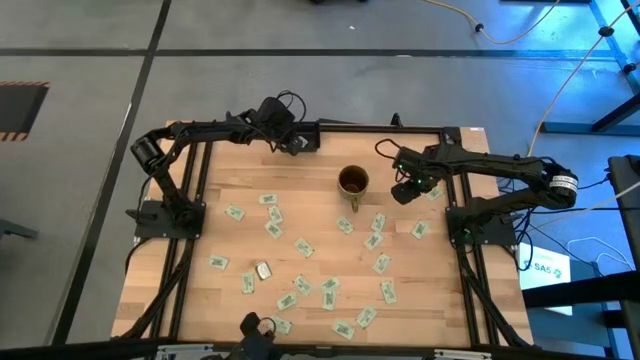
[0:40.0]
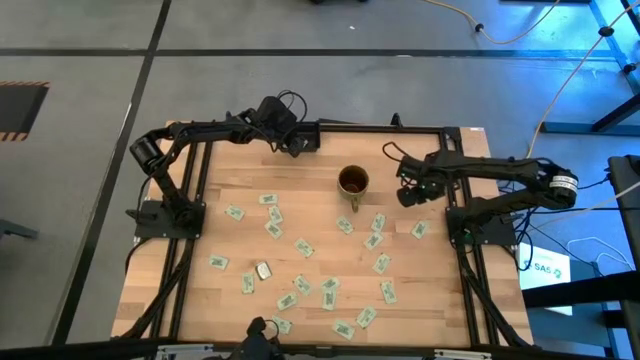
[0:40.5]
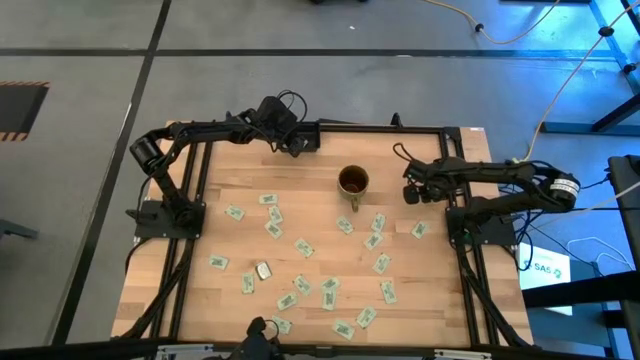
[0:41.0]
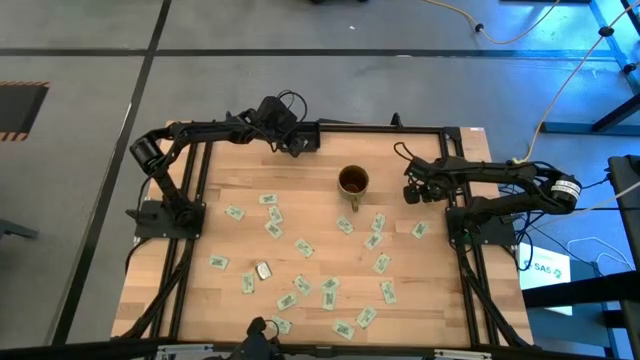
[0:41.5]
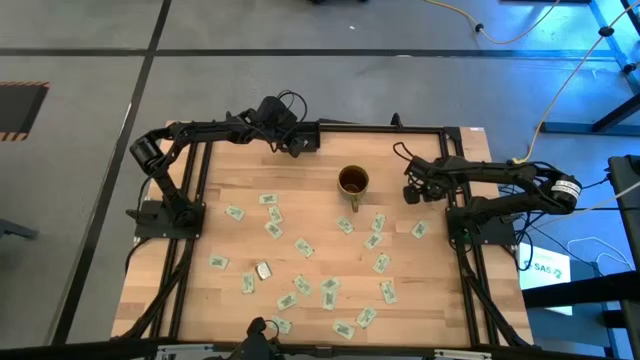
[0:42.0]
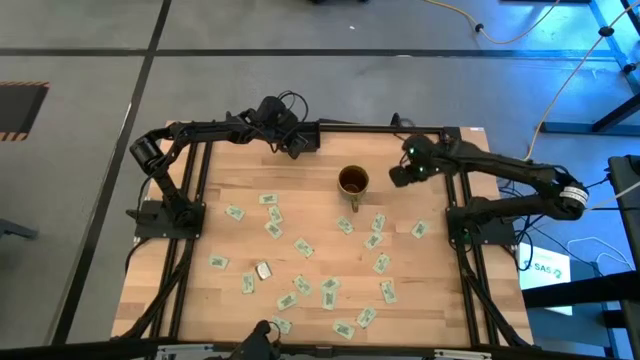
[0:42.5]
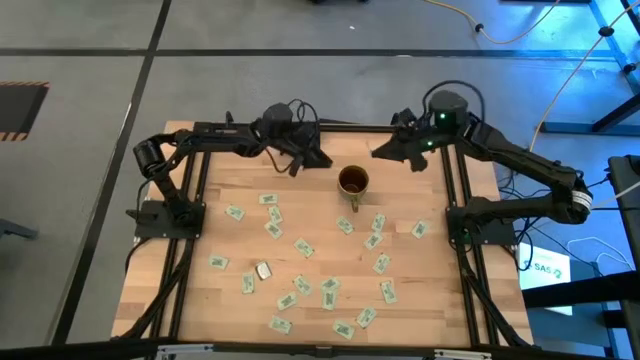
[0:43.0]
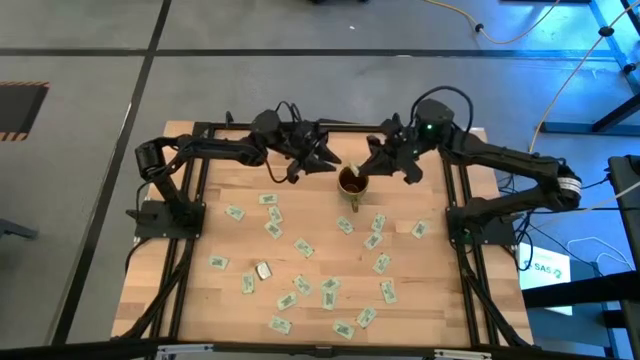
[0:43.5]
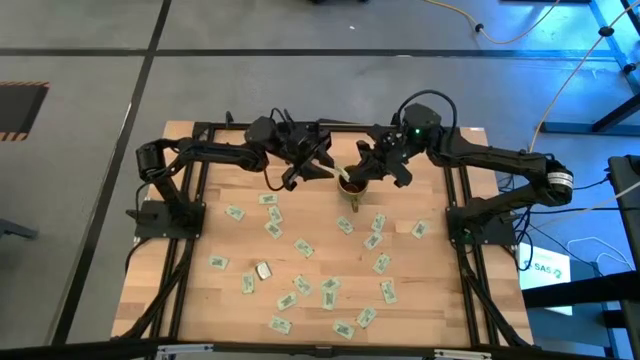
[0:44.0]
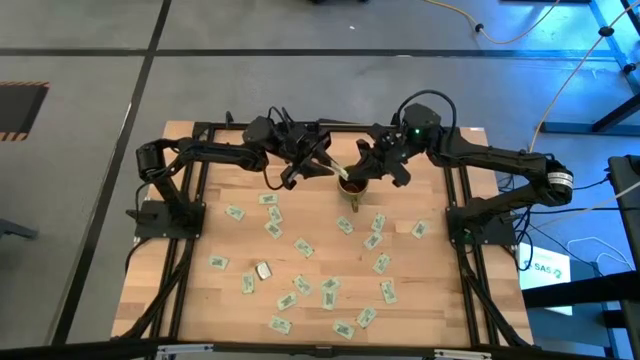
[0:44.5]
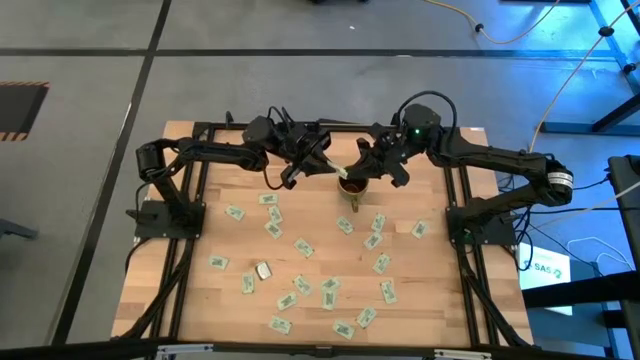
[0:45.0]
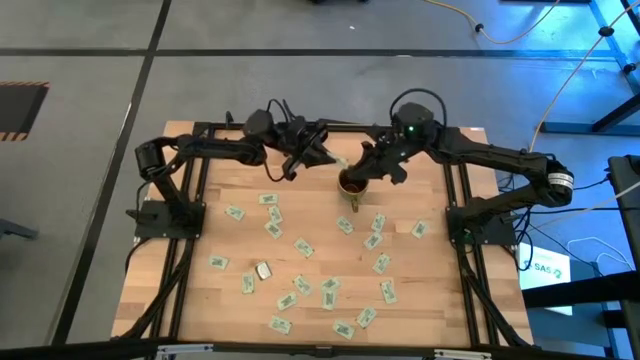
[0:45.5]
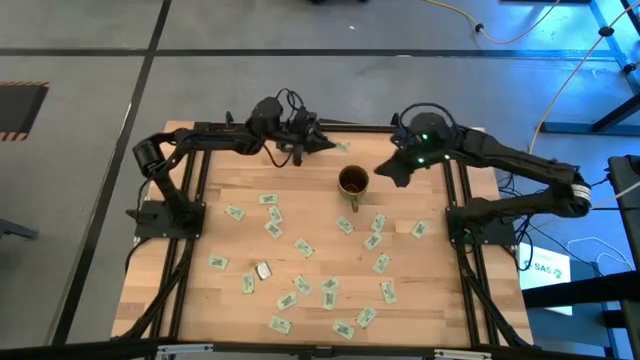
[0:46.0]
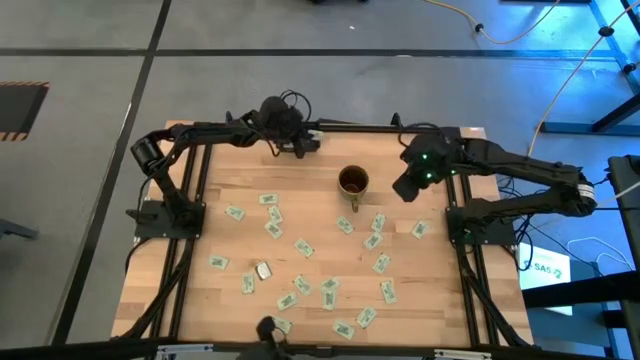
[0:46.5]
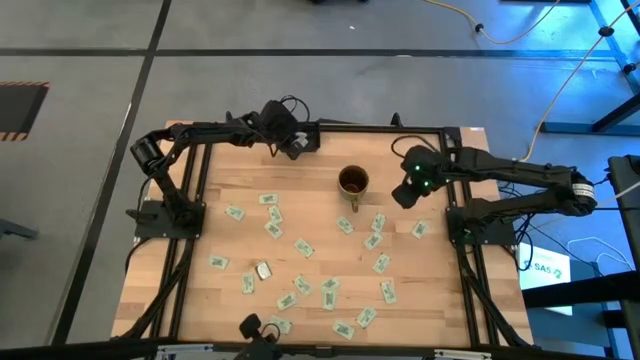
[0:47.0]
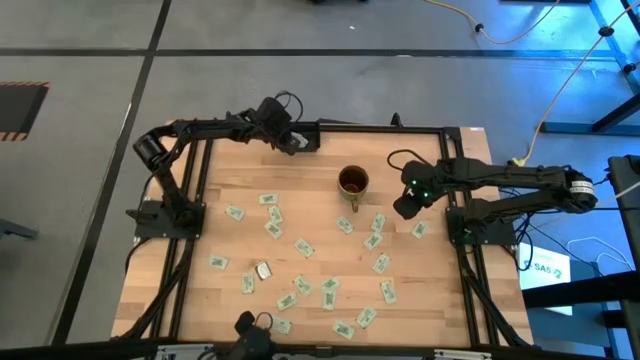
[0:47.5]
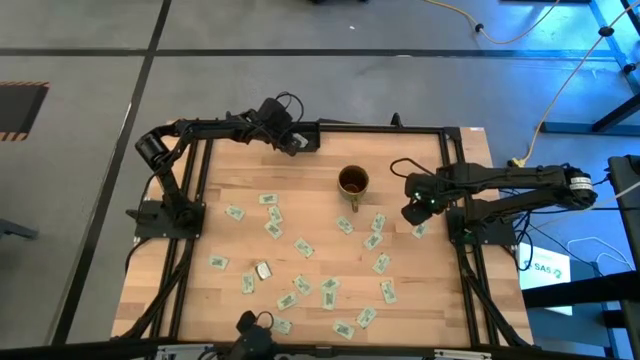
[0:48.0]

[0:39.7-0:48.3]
Task: Pick and place Stevia / Truvia into bins
Put the stevia packet into the black container

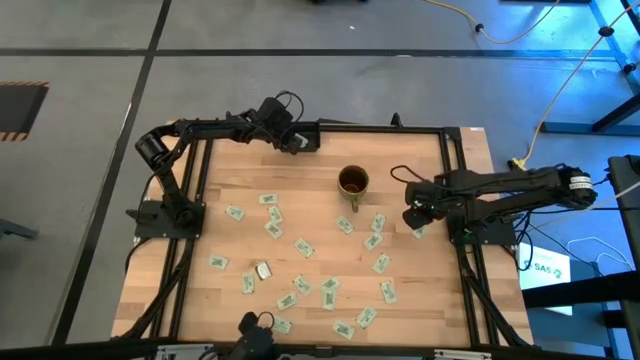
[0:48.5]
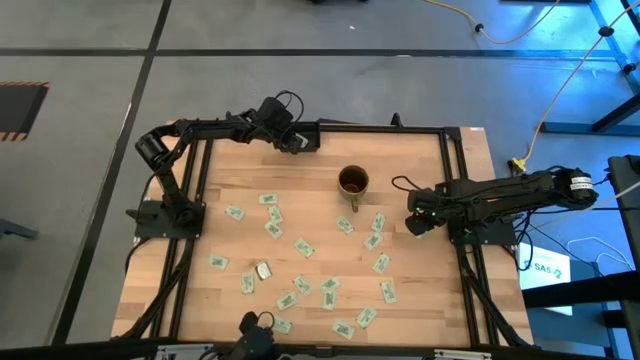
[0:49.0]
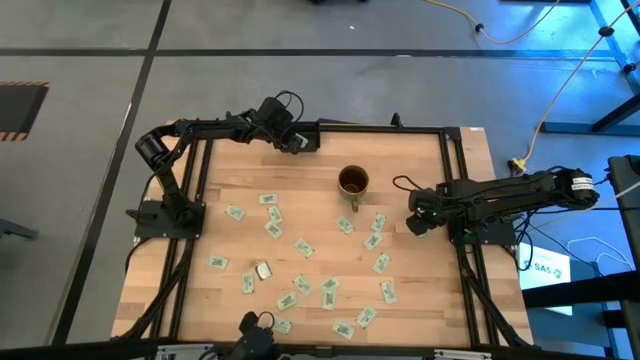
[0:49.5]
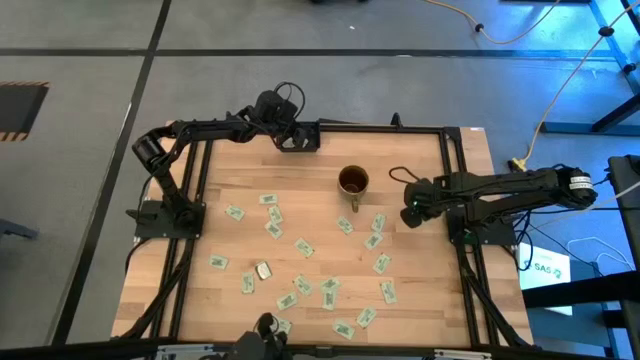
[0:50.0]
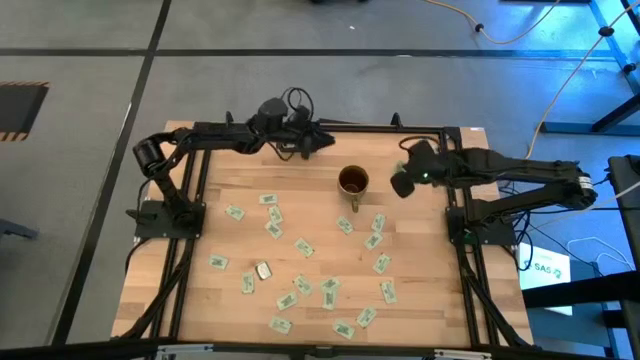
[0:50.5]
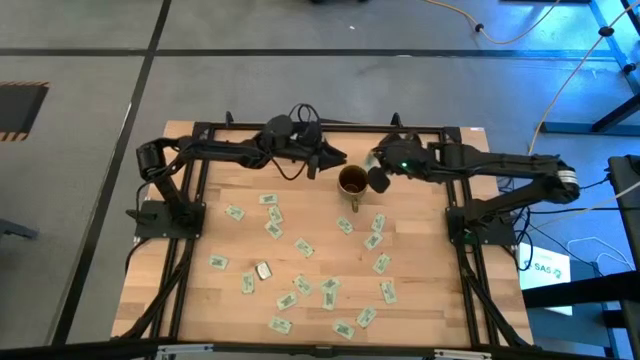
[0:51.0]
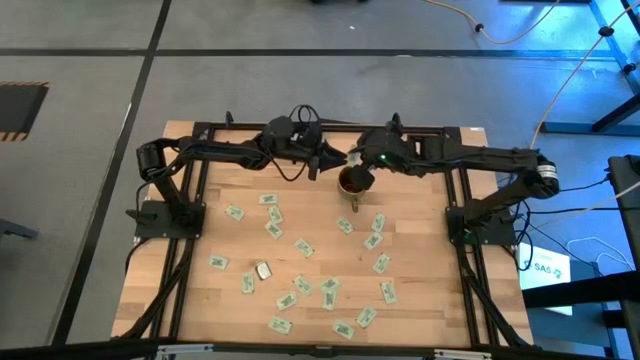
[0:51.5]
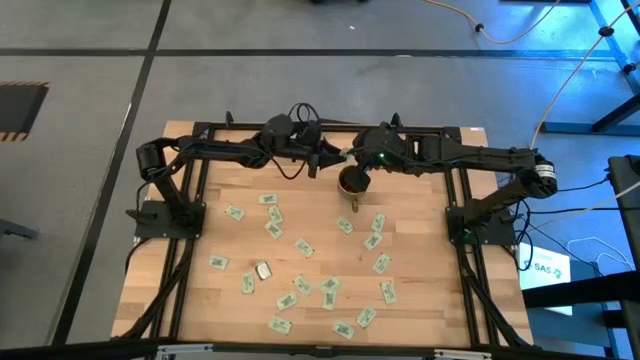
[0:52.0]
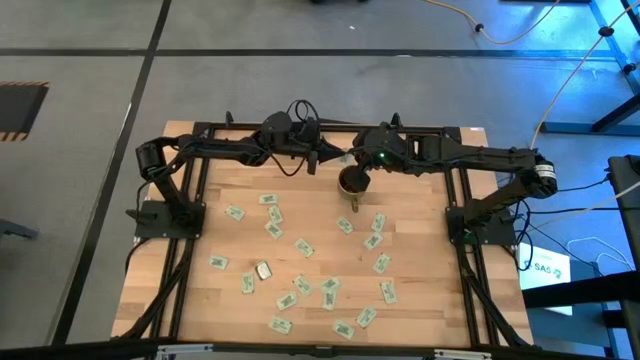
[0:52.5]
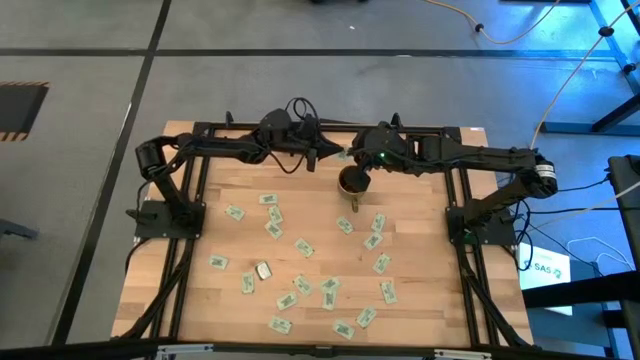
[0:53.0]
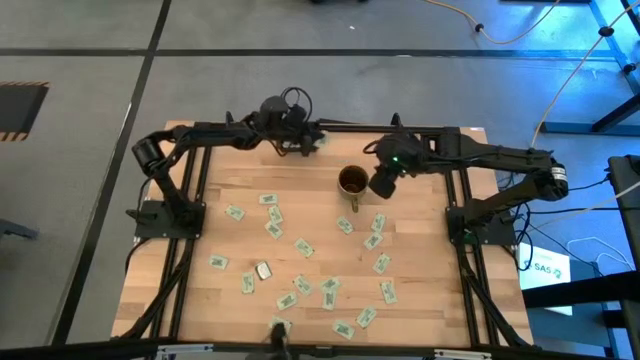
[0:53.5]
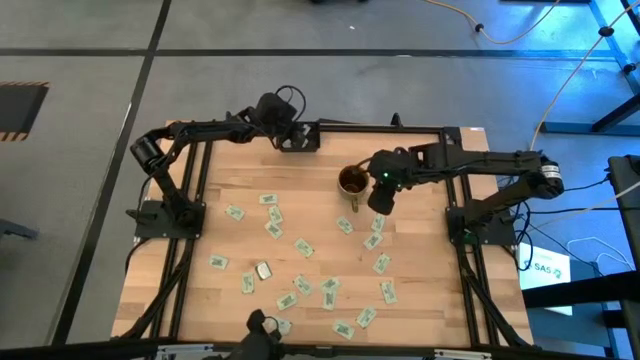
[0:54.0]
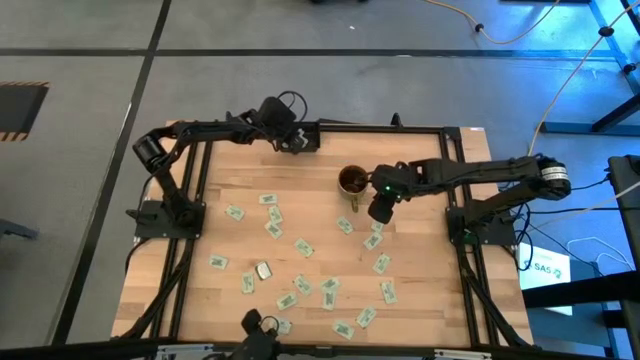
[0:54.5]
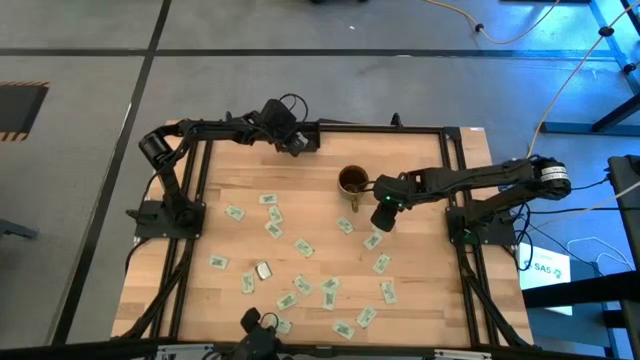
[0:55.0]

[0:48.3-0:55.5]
Put the stevia packet into the black container

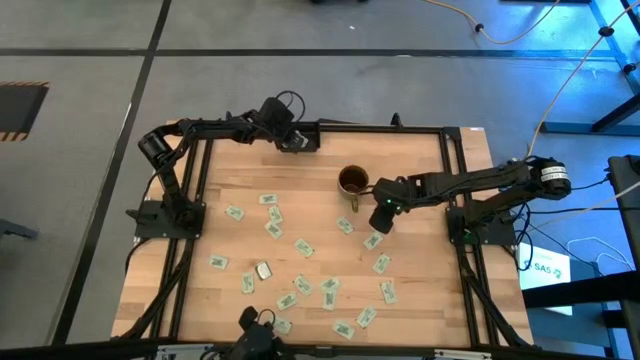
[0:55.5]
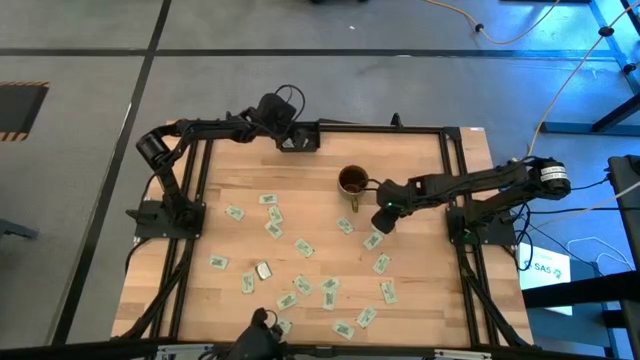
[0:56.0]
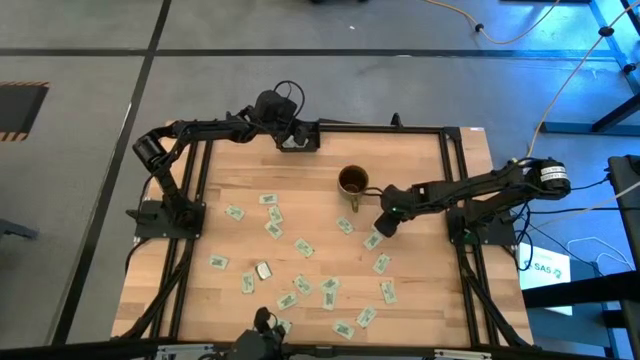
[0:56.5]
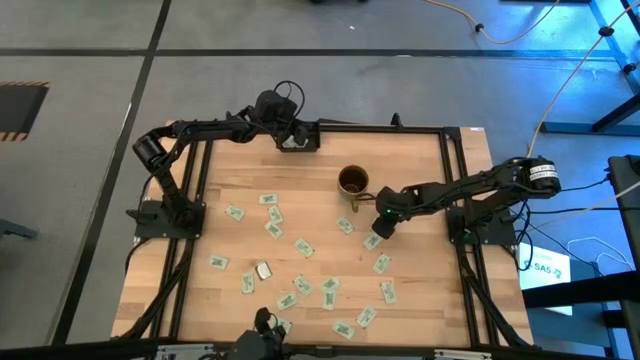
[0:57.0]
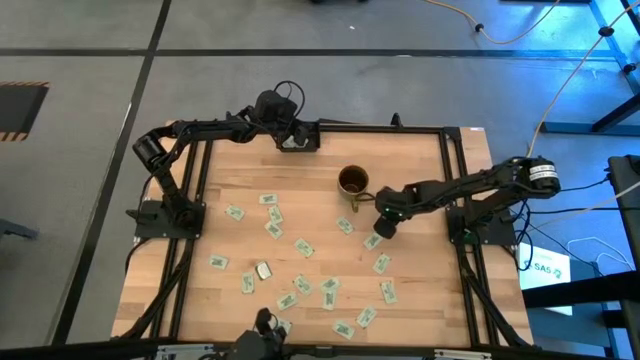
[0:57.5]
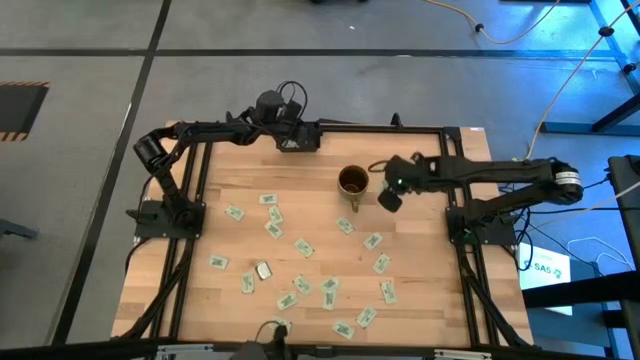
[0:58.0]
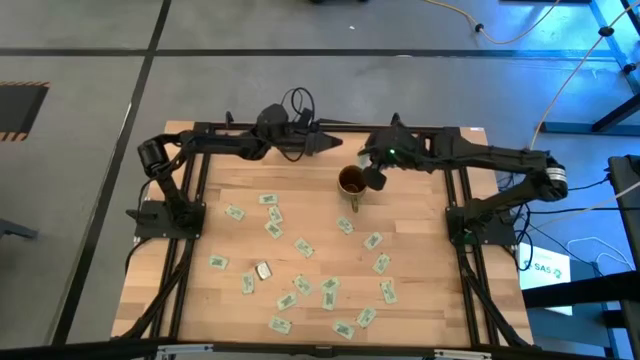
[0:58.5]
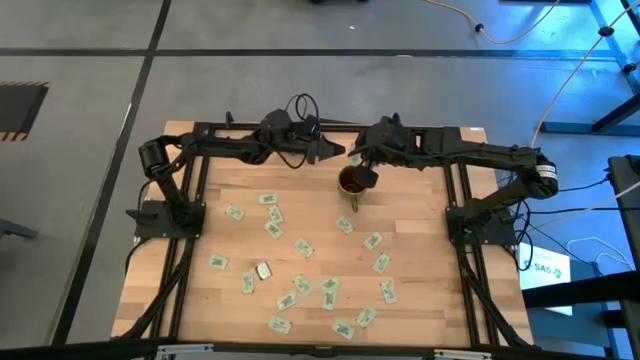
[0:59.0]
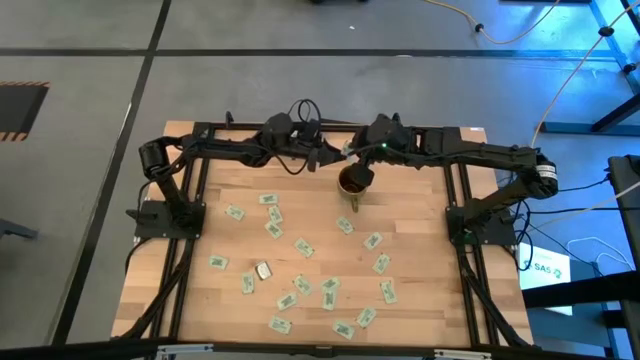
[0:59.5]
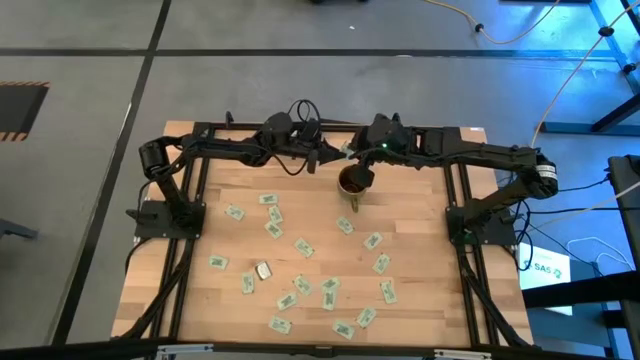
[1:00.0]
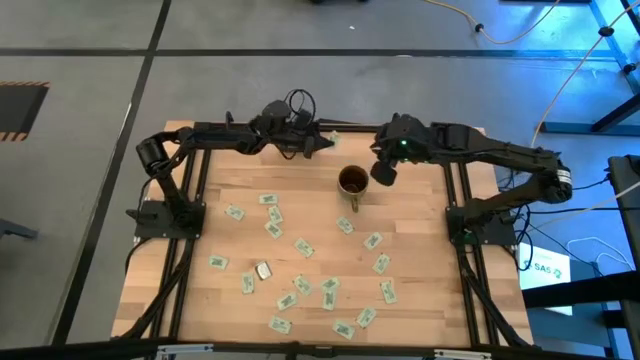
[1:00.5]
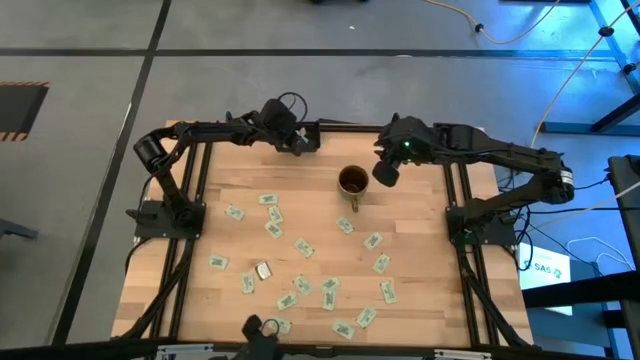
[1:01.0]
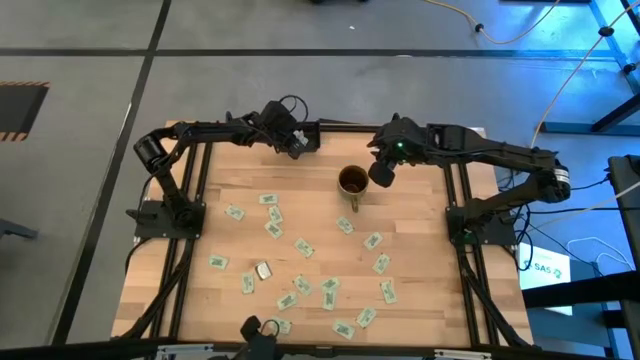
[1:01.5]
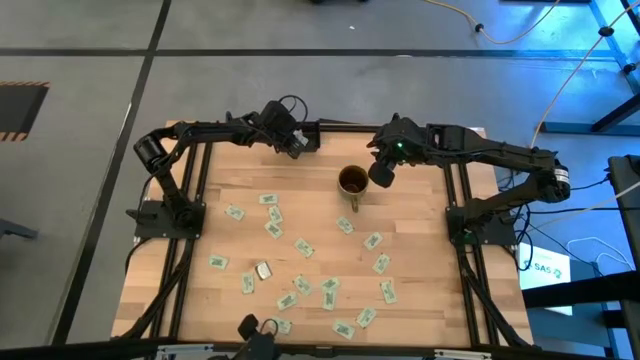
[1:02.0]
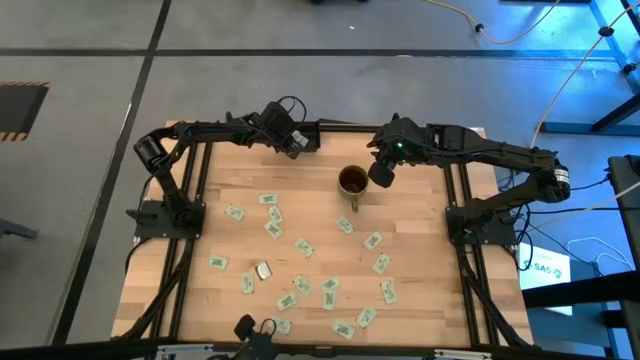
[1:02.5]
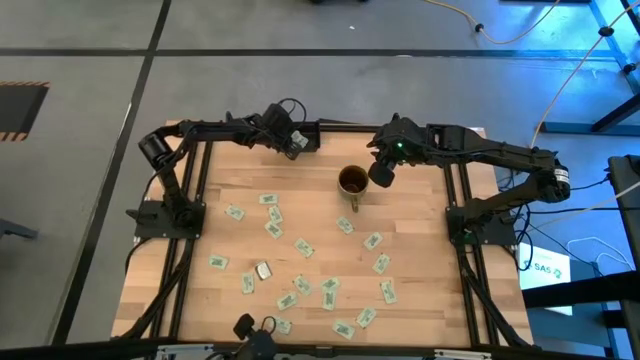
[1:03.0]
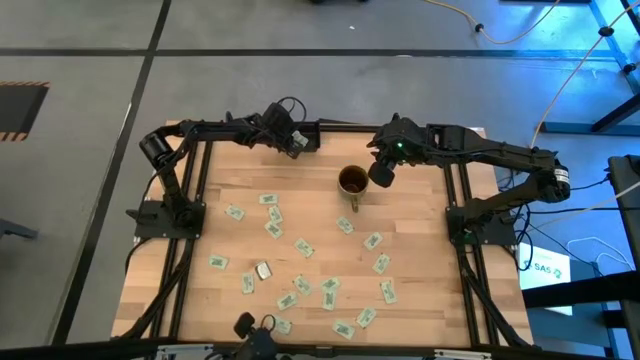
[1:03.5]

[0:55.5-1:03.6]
Put the stevia packet into the black container
